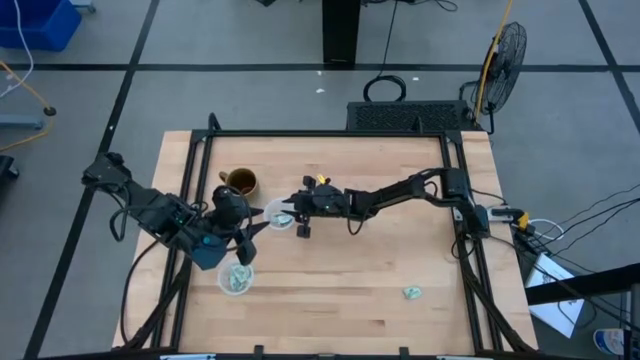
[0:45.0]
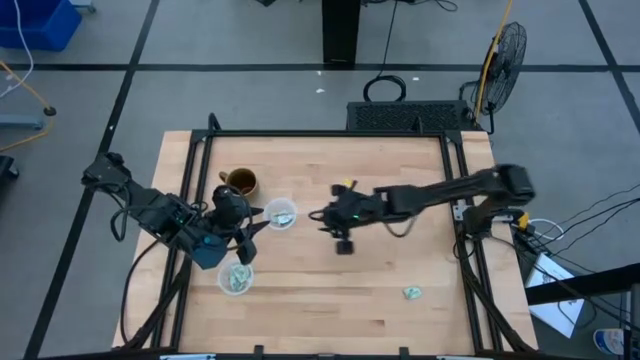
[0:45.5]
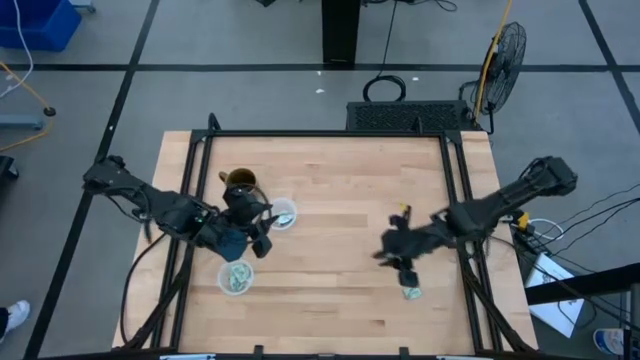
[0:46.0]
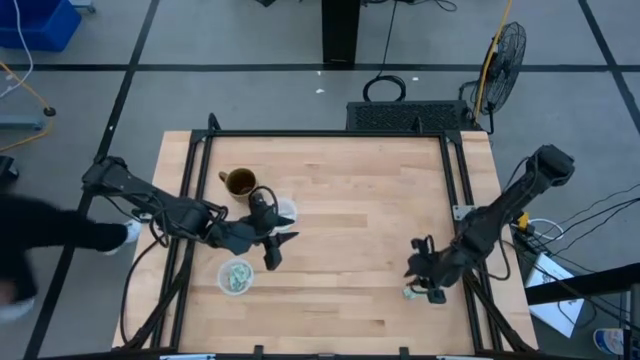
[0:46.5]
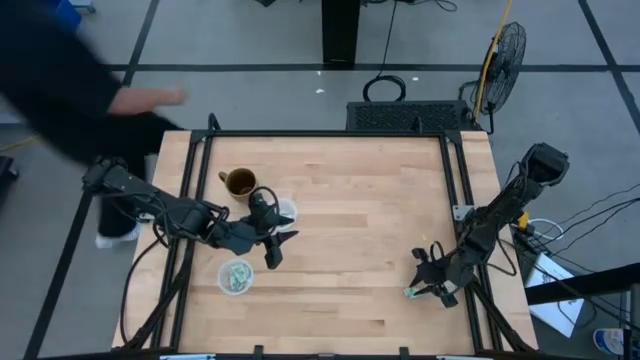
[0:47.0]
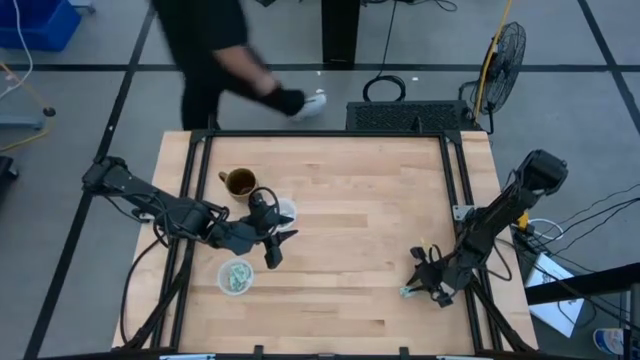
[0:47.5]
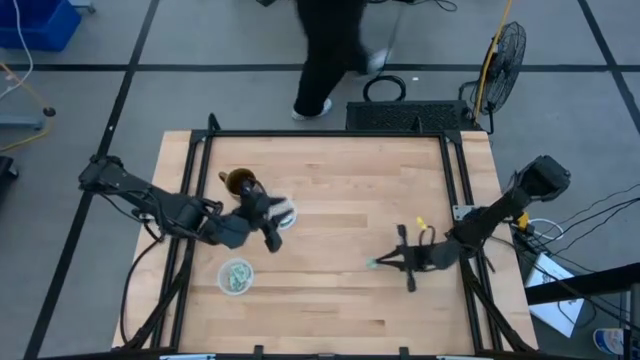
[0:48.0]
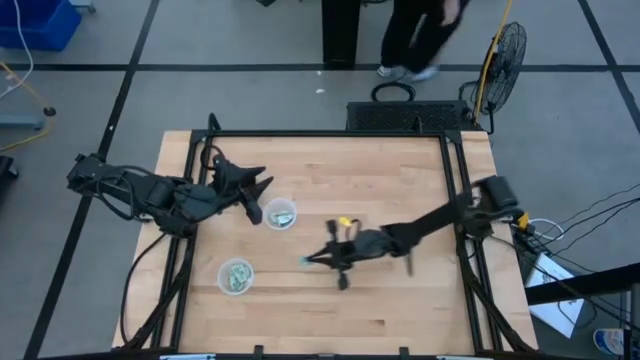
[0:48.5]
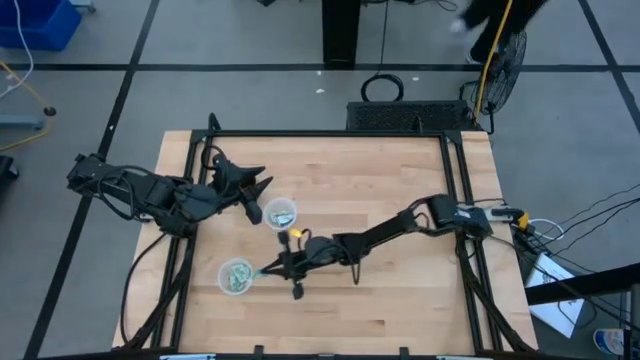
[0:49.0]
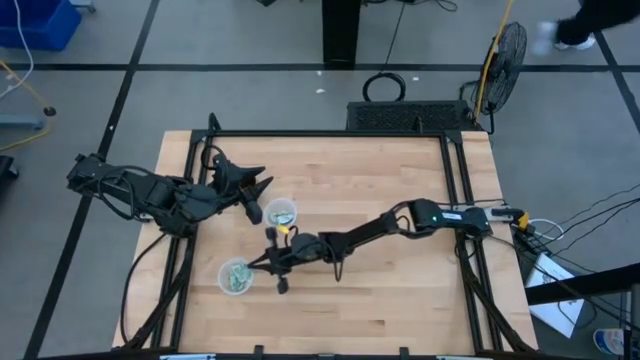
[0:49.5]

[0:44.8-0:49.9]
Task: Pick and place Stevia / Truvia into bins
Put the stevia packet into the bottom transparent container

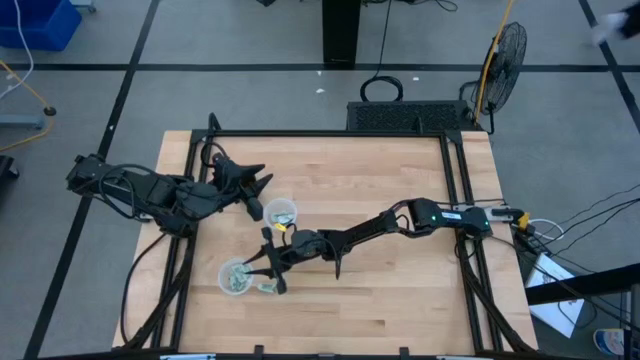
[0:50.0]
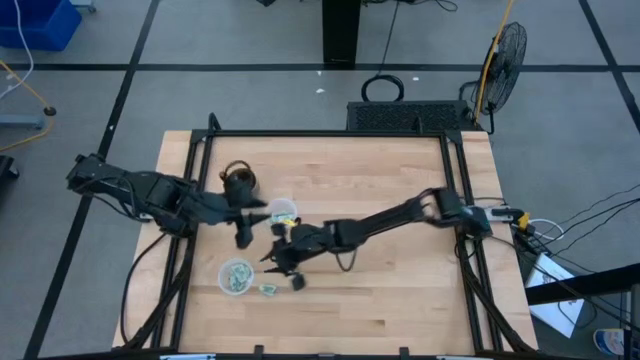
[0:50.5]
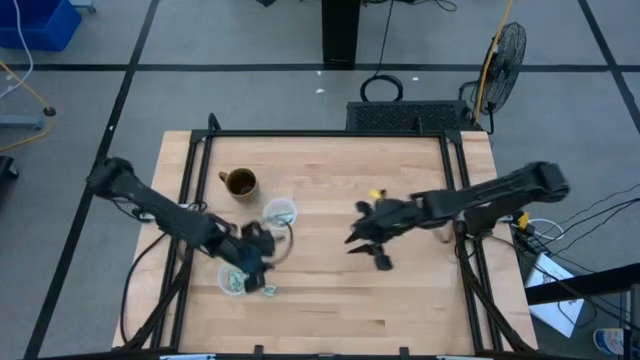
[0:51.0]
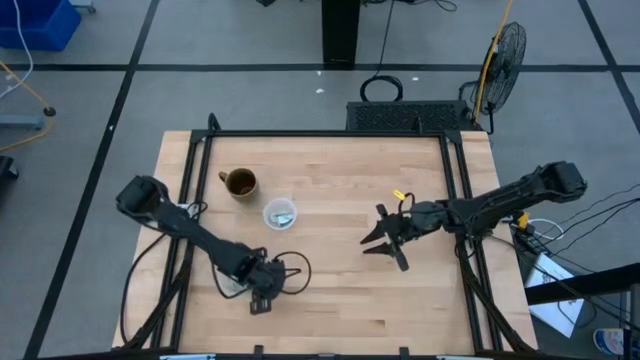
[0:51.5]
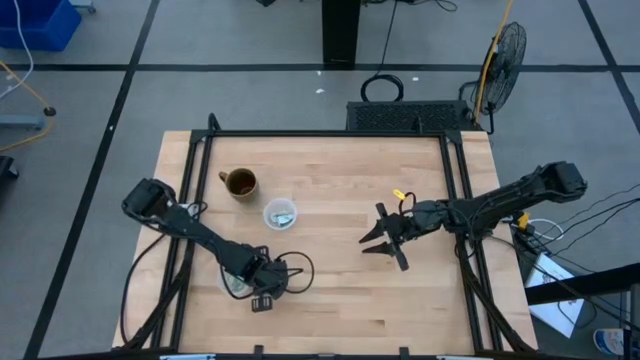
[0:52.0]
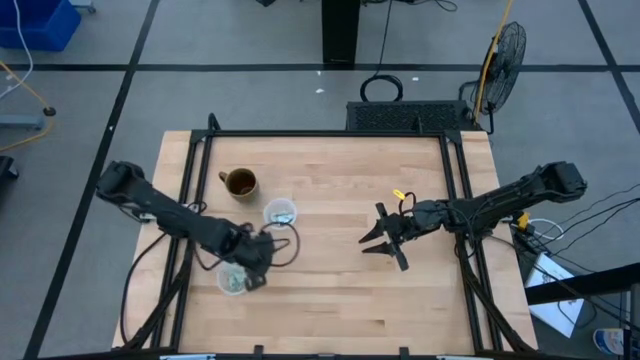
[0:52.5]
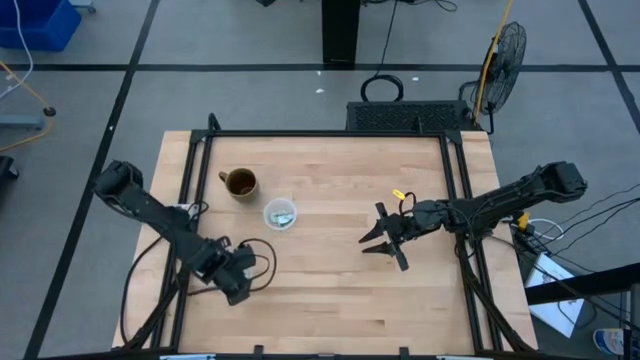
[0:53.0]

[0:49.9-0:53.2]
Put the stevia packet into the bottom transparent container

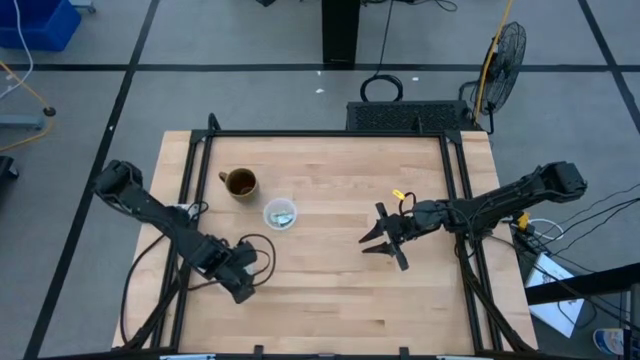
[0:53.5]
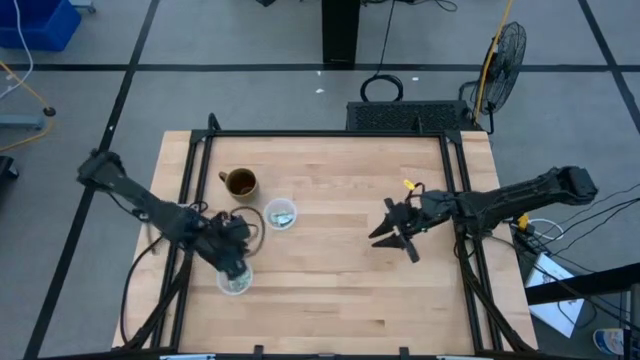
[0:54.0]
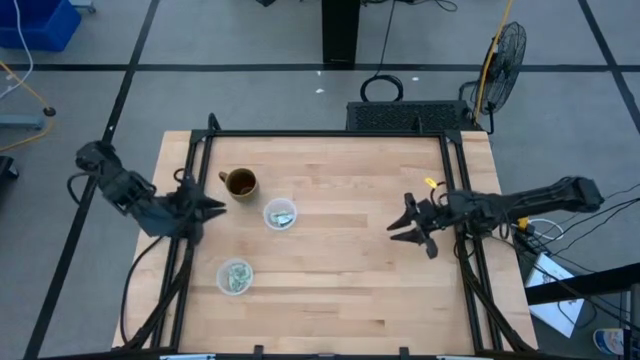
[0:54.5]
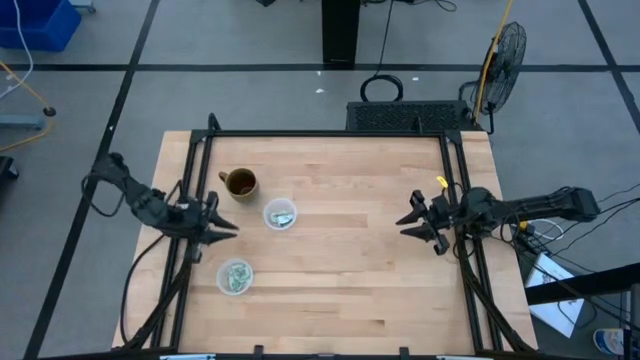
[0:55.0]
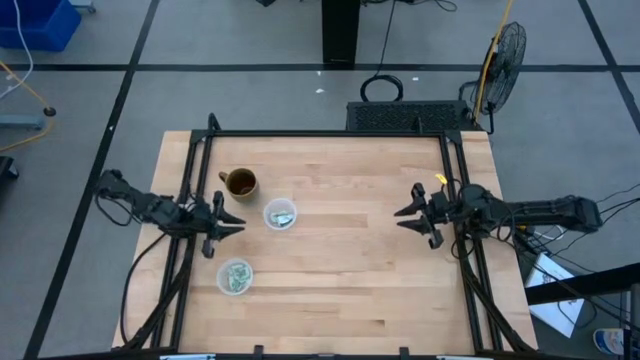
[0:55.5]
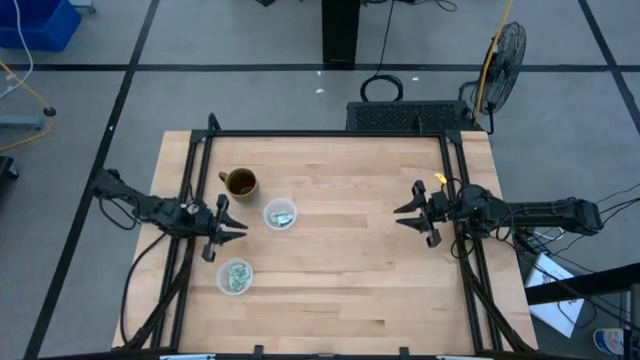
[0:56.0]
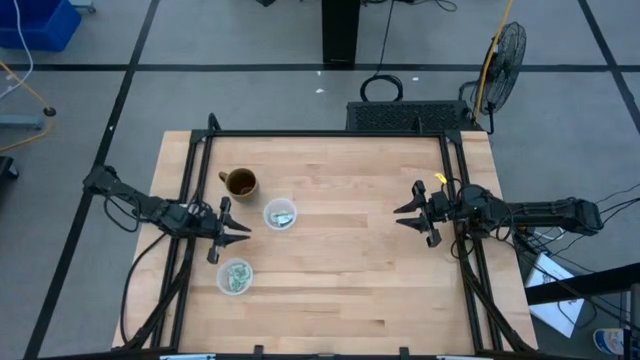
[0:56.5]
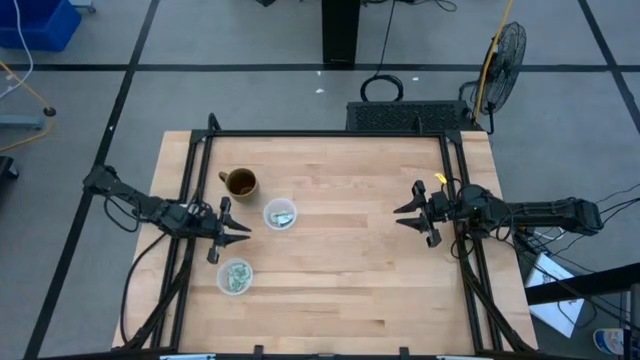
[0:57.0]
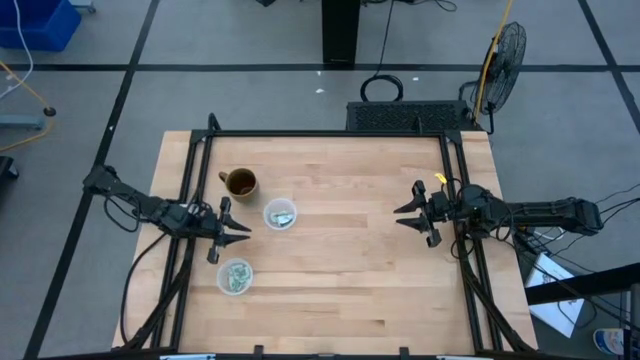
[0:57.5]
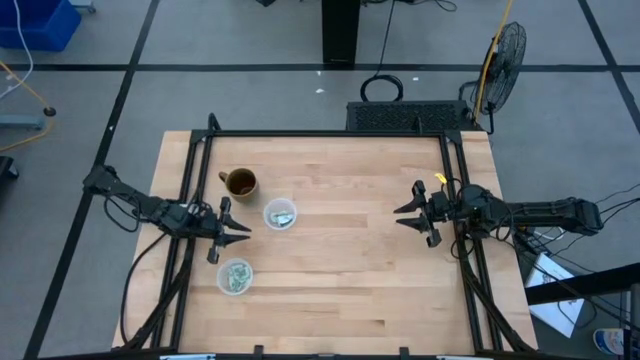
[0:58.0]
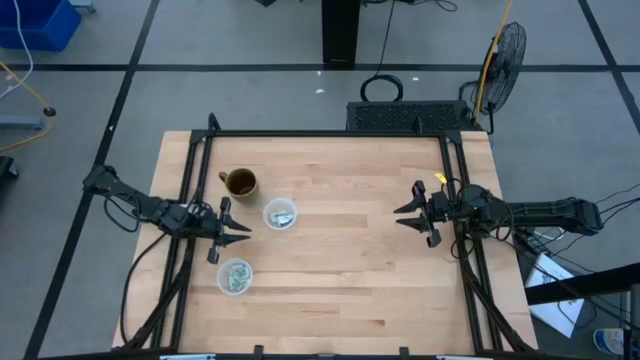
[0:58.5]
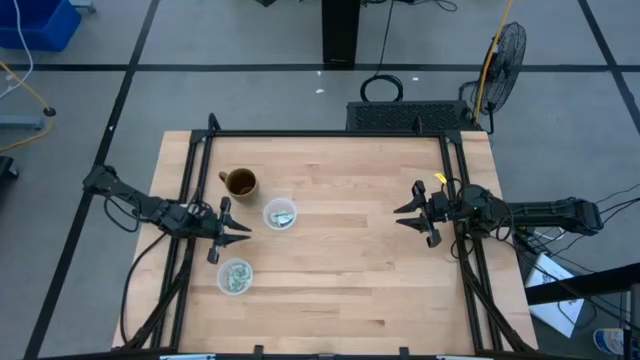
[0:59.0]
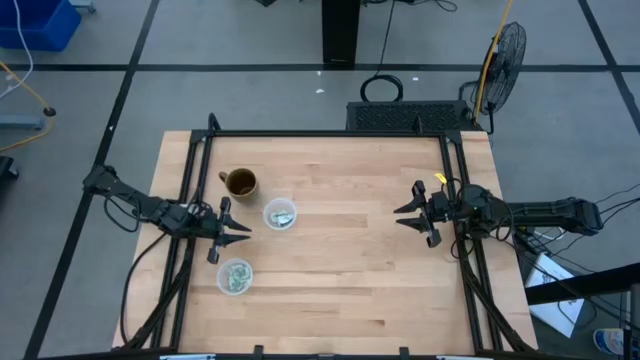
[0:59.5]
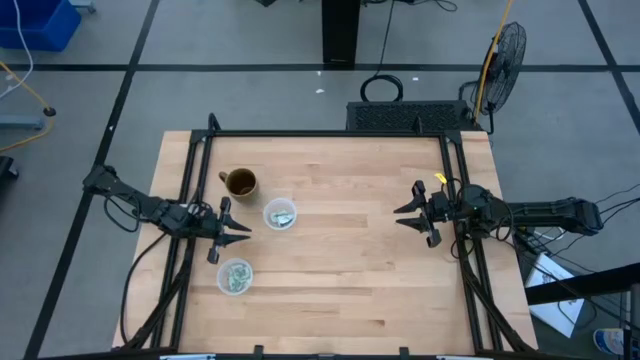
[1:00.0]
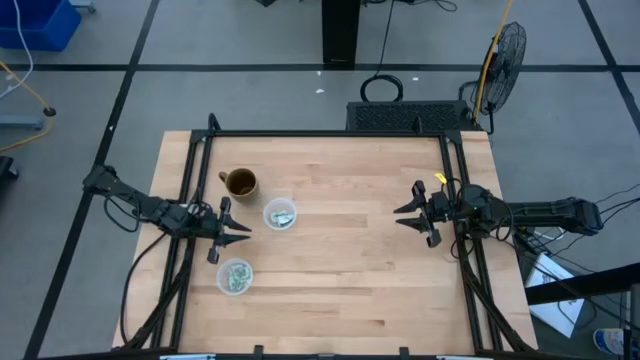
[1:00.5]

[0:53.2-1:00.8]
Return to Home Position

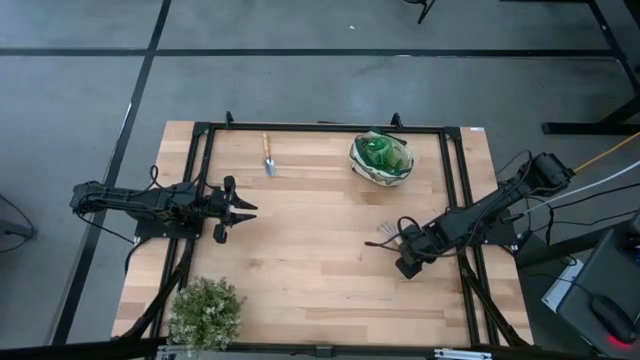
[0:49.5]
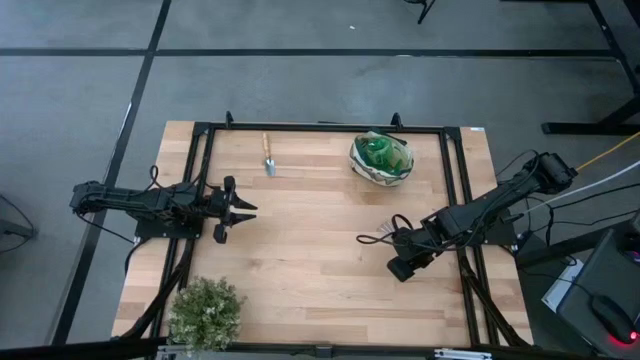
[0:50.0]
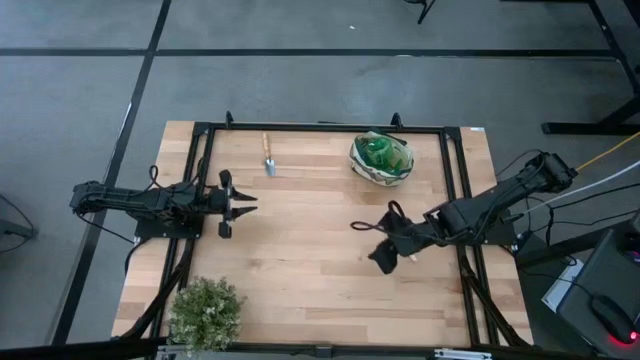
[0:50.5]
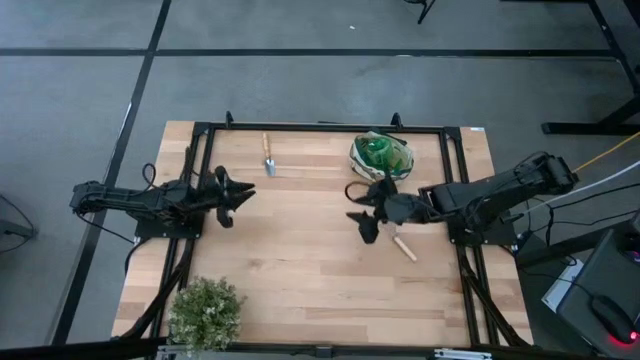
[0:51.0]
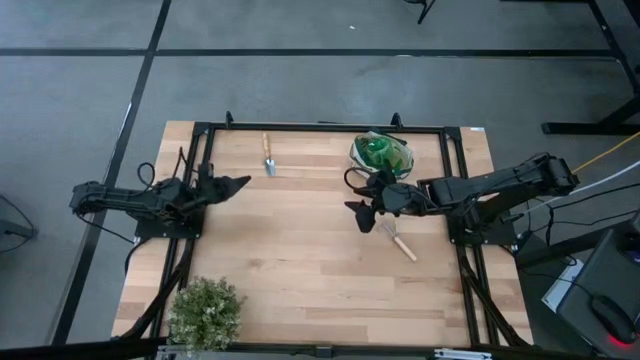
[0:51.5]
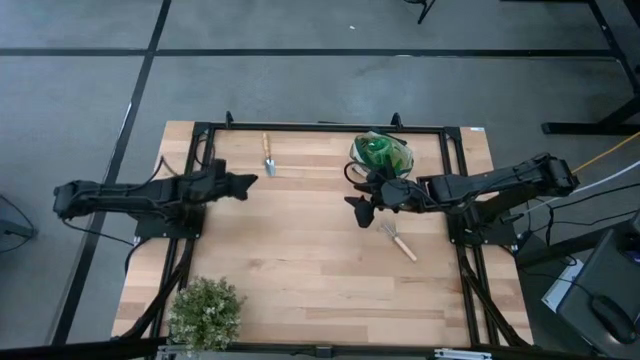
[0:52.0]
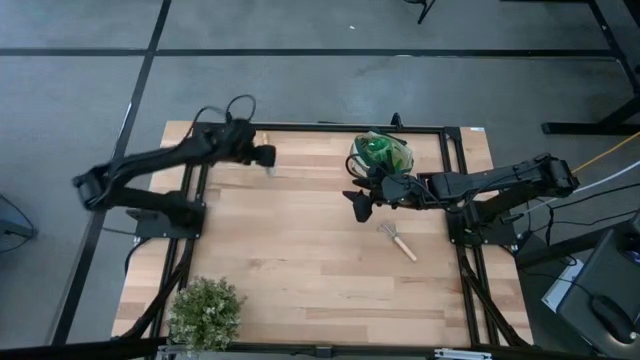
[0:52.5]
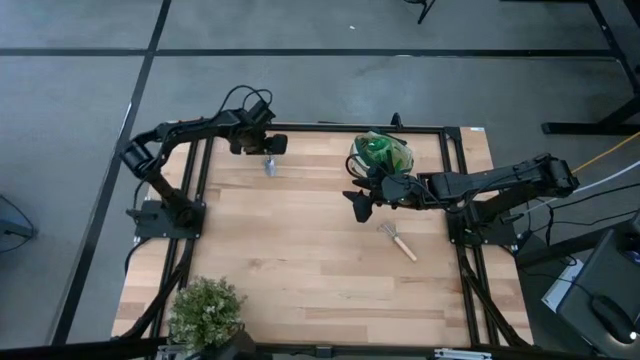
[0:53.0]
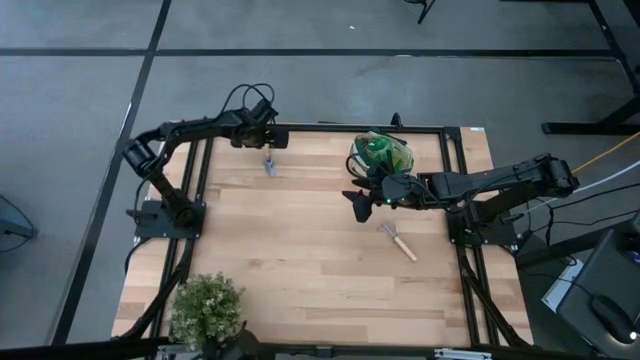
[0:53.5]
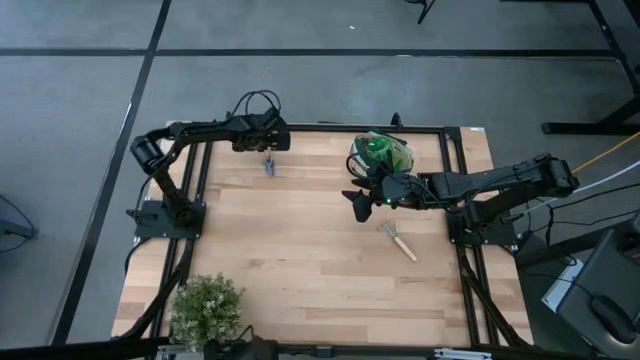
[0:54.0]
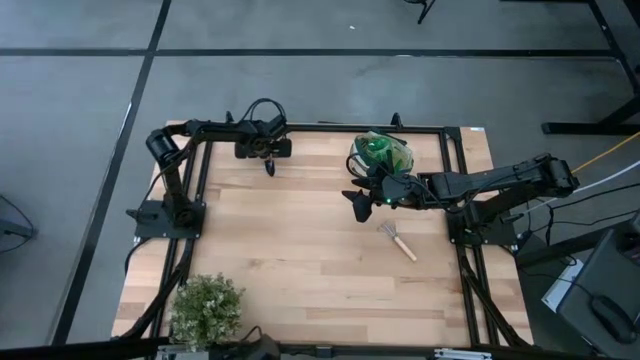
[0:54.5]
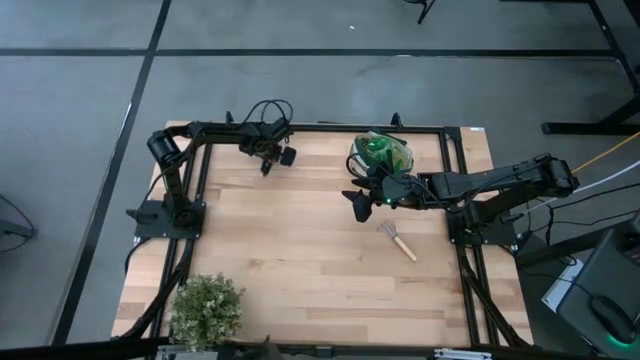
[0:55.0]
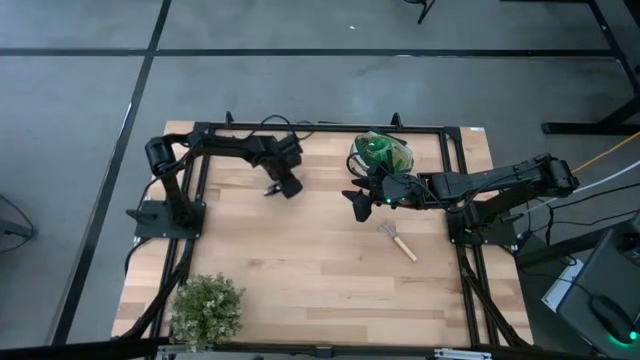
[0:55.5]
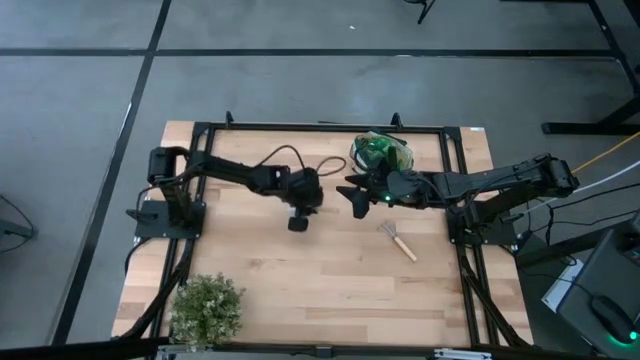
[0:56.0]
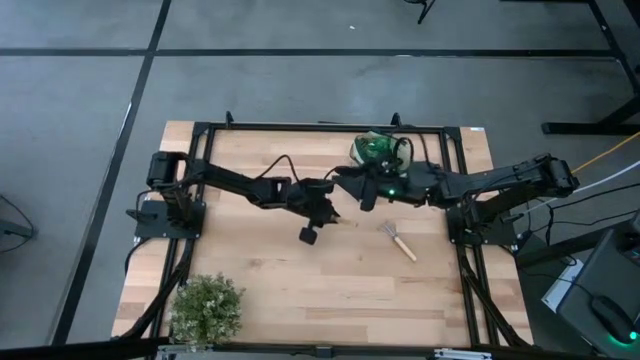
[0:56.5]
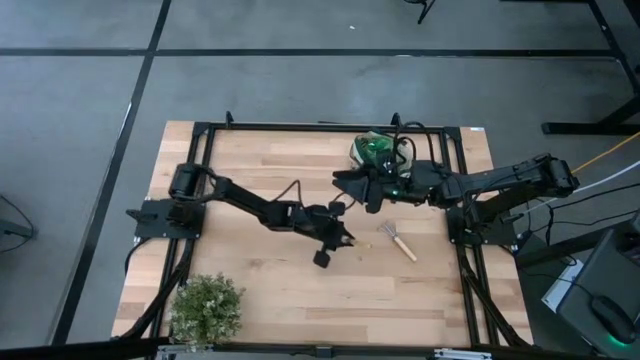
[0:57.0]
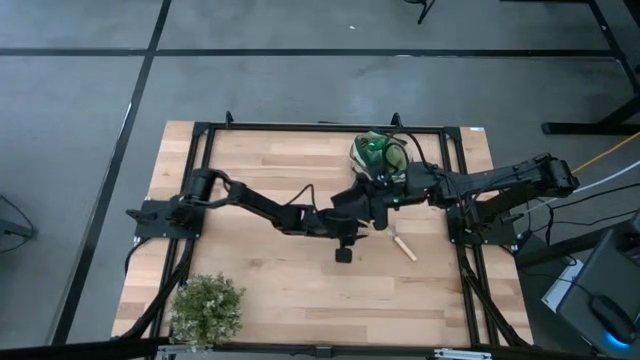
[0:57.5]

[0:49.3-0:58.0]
Task: Pick & Place Garden tools in Gardening bag
Move the hand trowel to the center of the table
